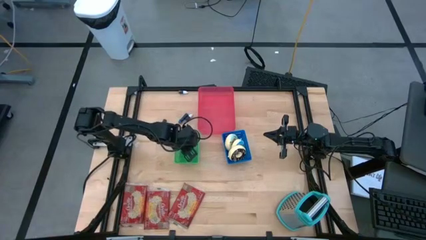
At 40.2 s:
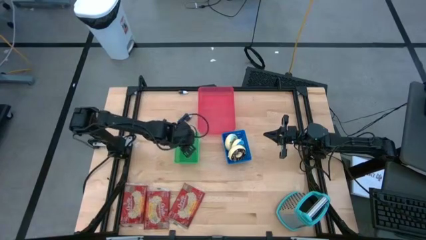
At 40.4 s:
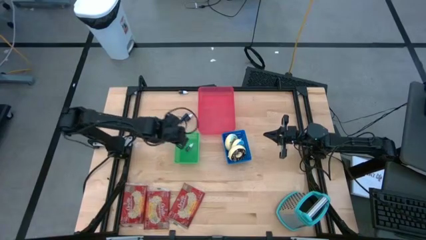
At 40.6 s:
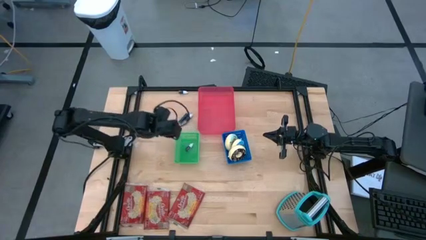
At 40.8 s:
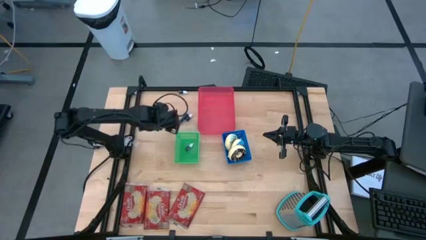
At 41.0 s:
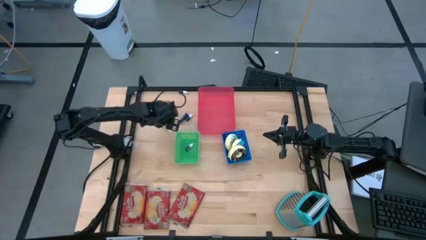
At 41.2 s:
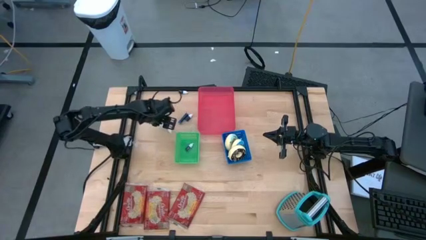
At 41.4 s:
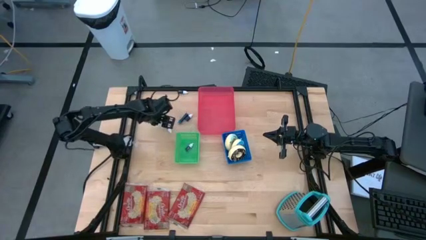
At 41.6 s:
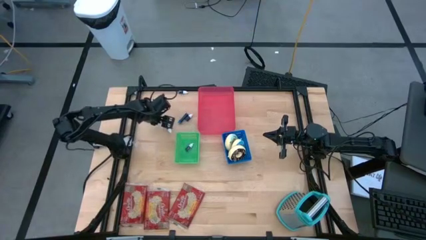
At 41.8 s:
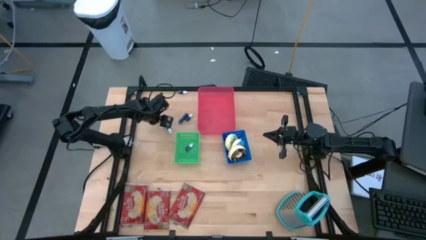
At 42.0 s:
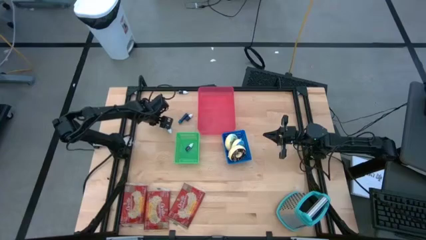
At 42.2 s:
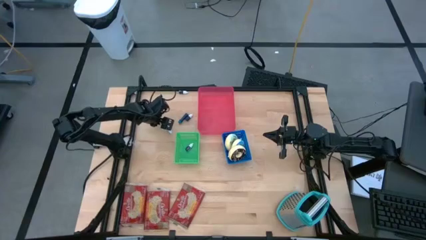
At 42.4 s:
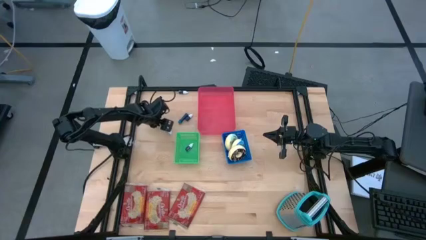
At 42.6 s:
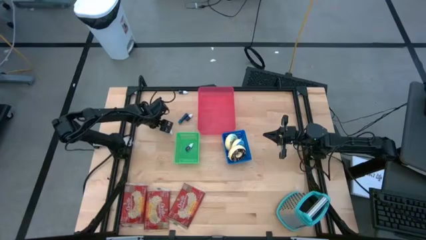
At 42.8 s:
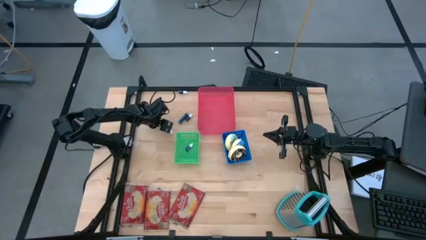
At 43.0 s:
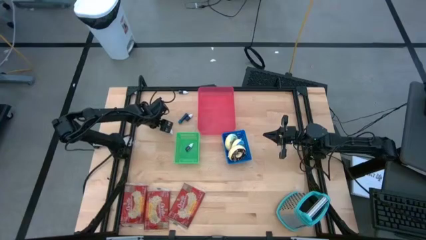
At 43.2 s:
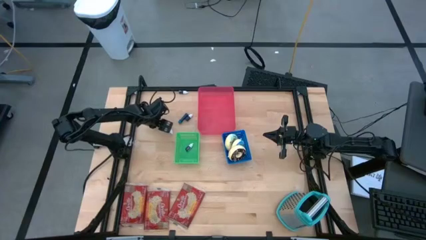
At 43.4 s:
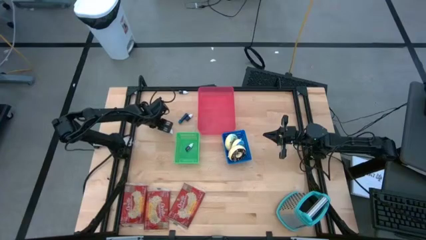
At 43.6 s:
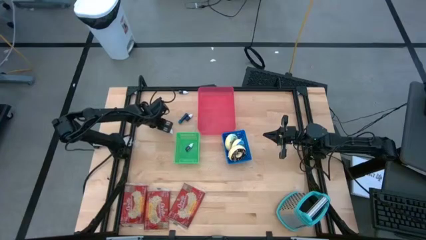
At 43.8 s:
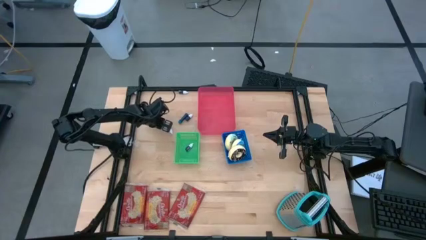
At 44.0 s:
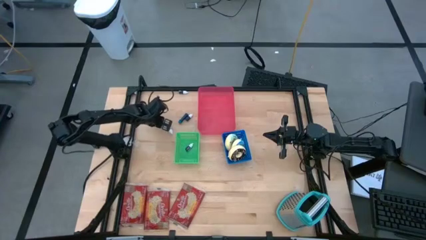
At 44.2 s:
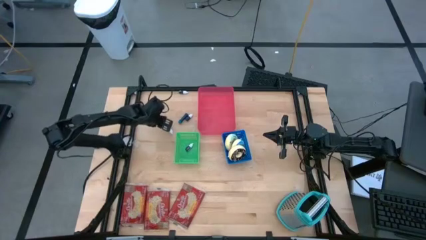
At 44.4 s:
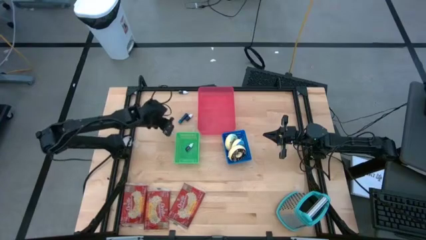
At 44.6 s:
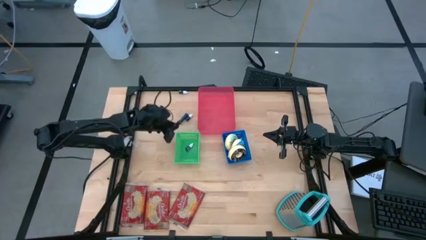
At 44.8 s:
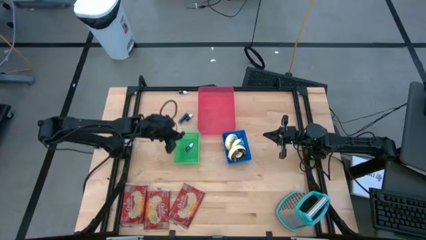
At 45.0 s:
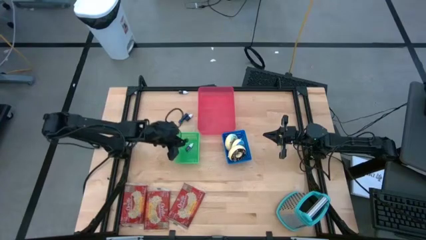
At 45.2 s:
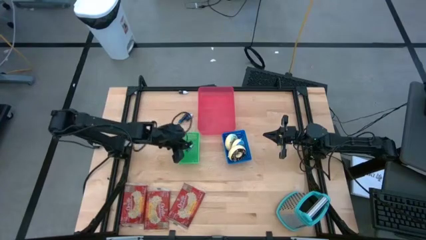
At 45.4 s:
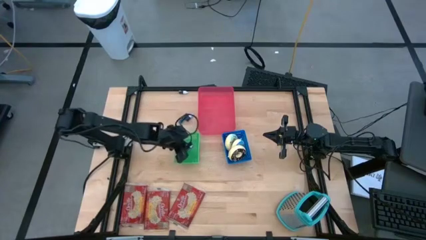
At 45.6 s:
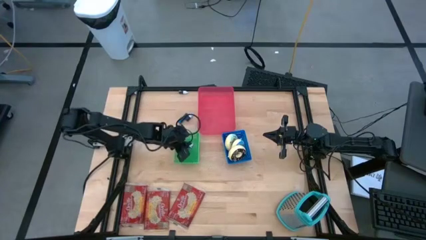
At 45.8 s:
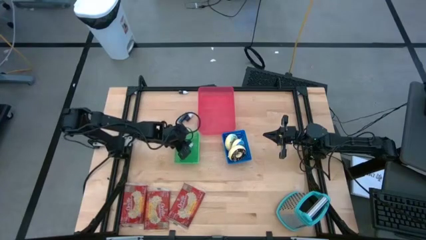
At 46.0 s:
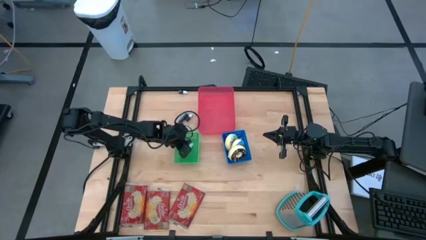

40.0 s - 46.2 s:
Put the brown food coloring bottle into the green bin

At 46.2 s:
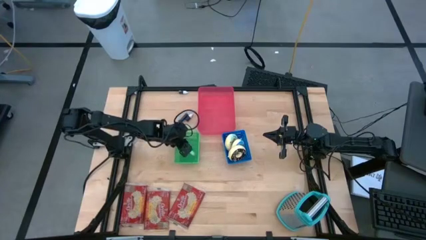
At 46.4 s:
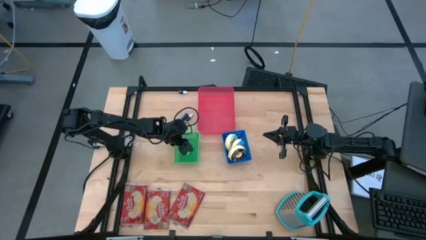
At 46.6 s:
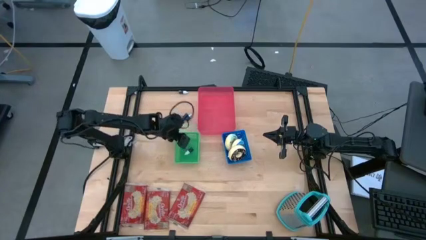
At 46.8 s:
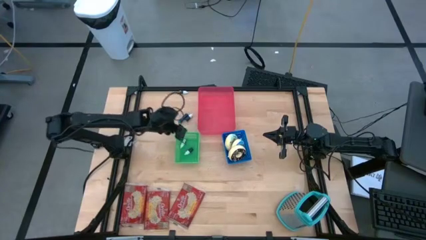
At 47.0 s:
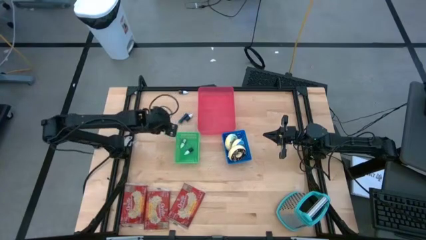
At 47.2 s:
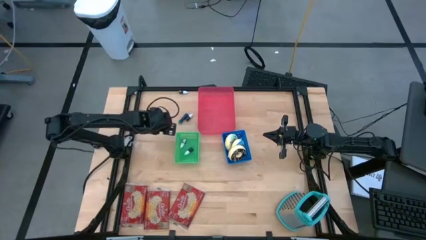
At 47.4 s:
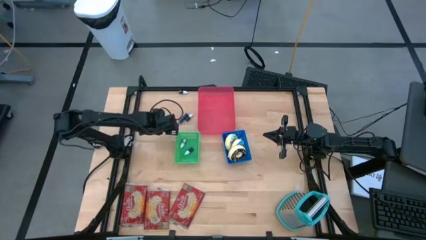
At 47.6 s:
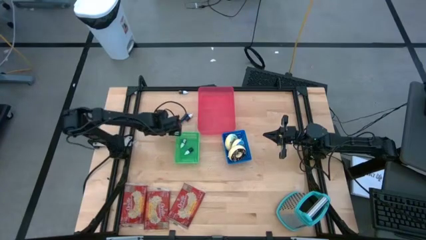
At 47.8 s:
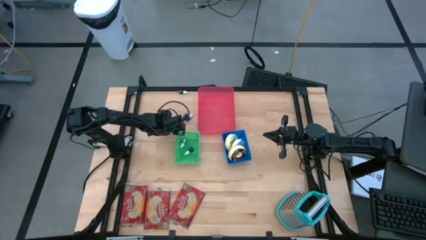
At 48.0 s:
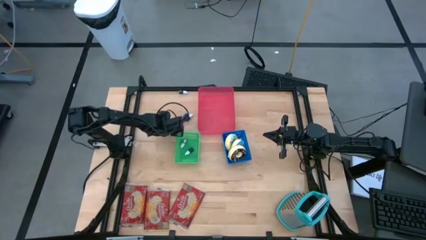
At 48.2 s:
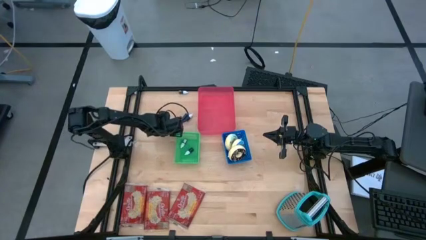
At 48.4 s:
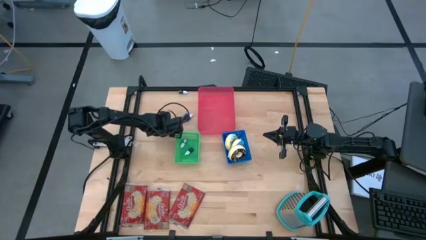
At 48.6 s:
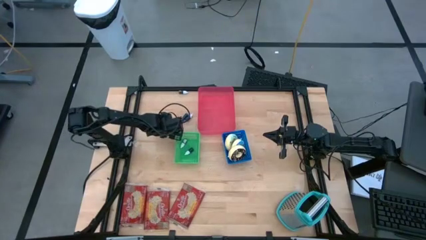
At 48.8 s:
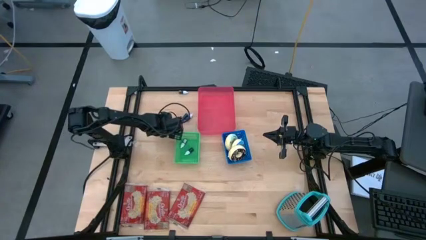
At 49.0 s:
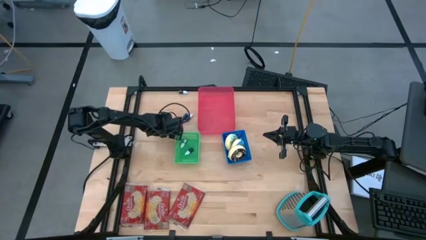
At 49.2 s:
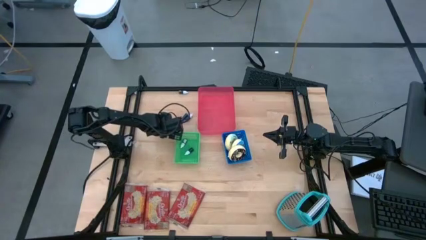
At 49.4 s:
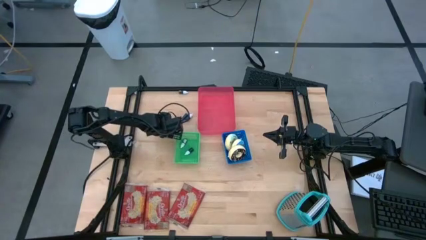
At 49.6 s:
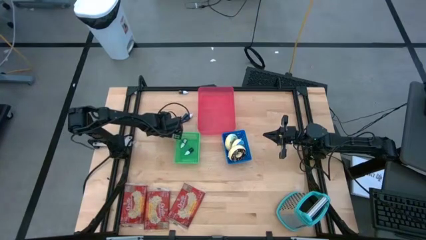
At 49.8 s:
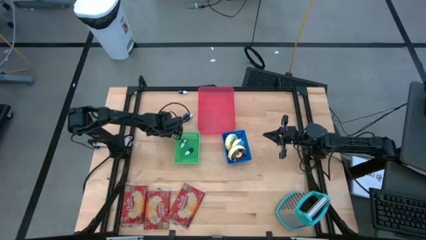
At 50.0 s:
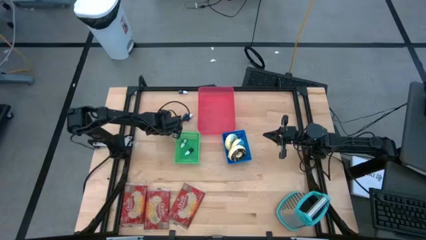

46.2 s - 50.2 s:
Put the black food coloring bottle into the green bin

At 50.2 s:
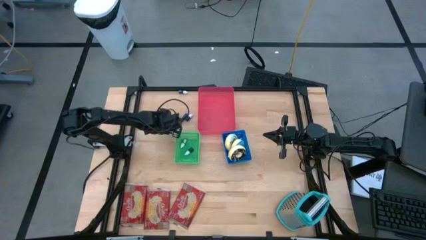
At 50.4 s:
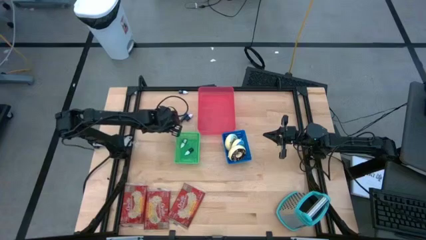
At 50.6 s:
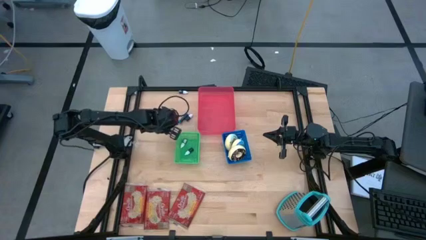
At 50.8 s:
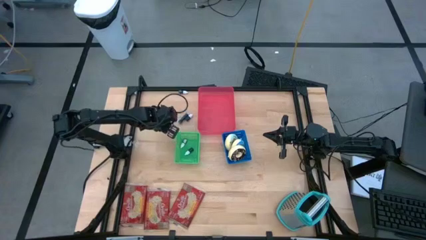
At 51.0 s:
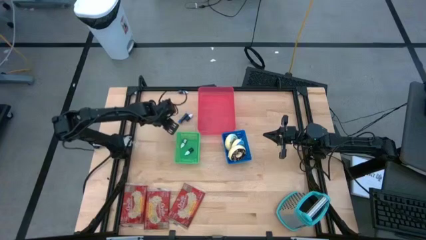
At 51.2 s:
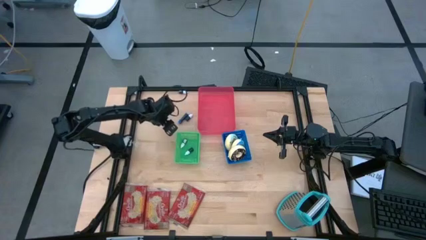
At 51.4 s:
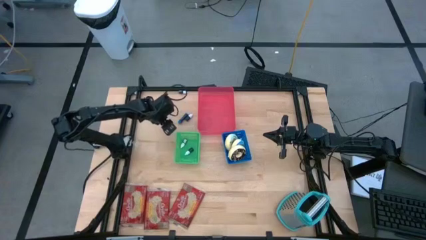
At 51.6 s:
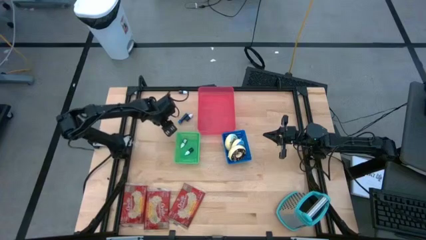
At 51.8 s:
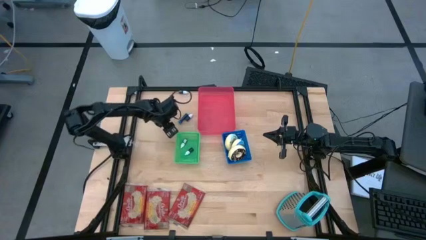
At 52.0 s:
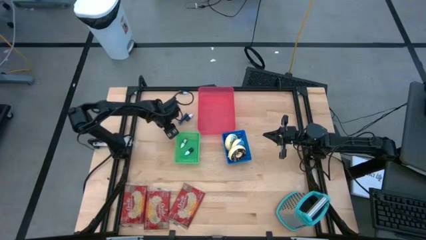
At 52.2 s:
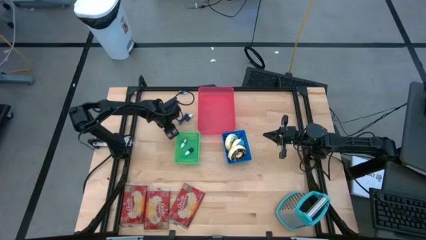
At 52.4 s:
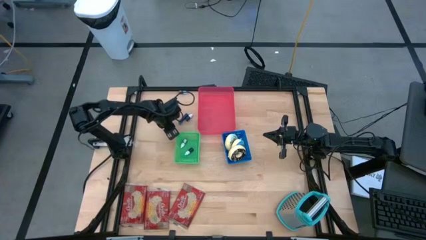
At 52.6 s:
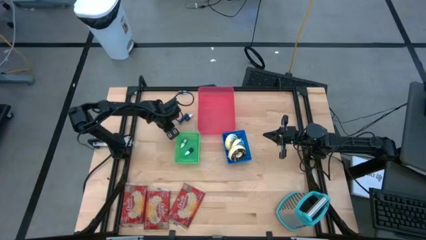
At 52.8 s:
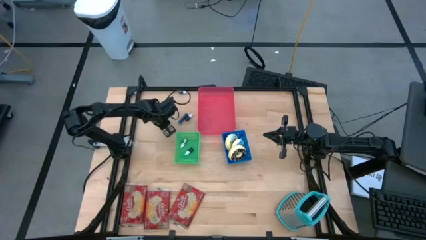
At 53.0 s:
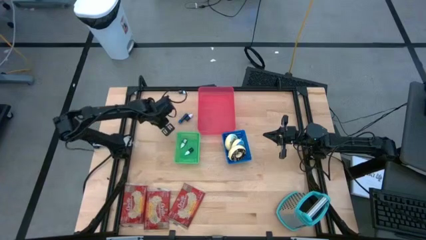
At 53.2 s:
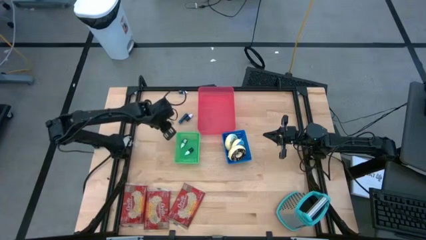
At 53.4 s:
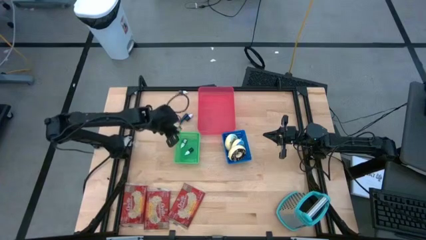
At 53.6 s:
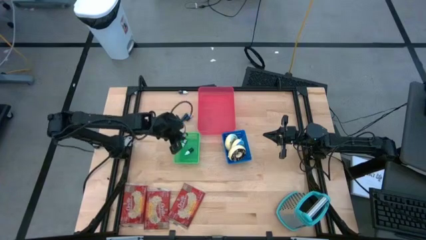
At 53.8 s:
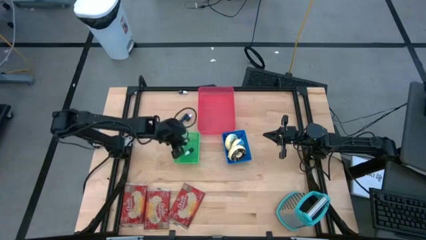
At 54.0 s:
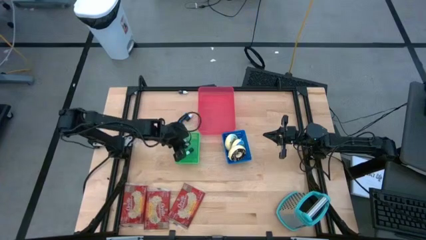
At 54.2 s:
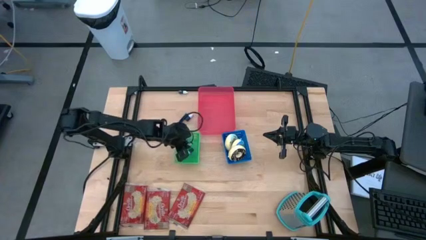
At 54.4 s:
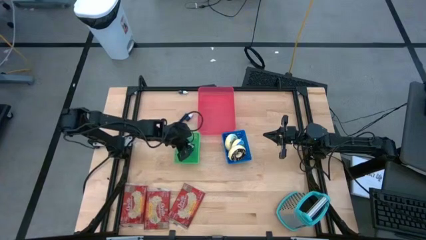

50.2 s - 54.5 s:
Put the black food coloring bottle into the green bin
